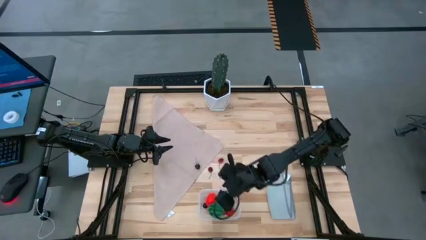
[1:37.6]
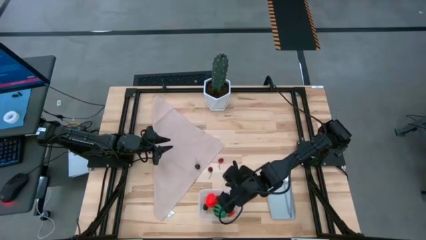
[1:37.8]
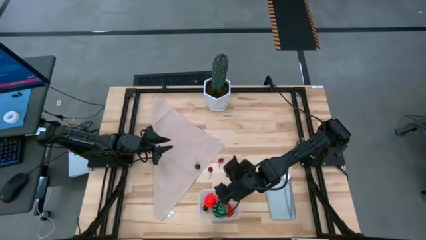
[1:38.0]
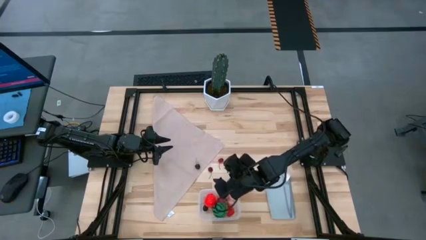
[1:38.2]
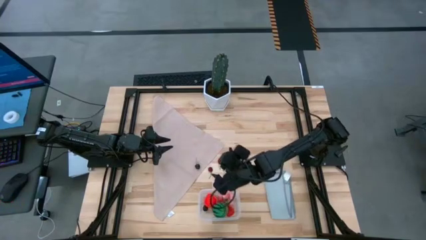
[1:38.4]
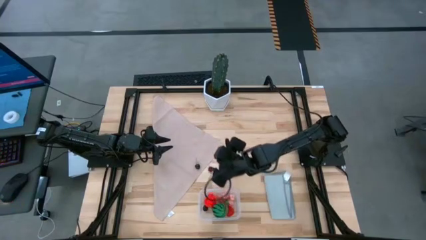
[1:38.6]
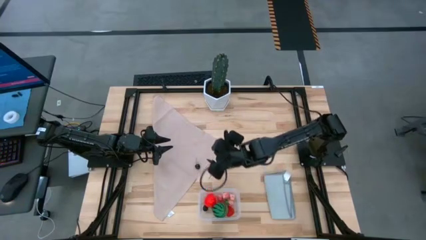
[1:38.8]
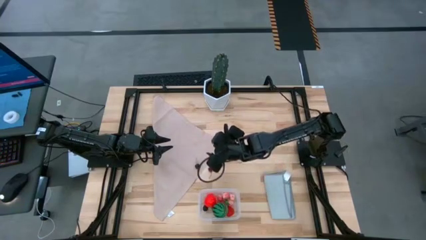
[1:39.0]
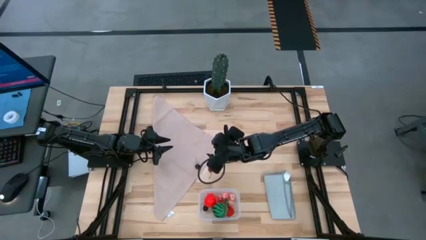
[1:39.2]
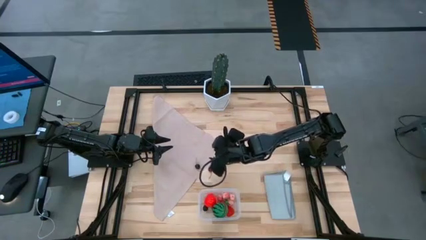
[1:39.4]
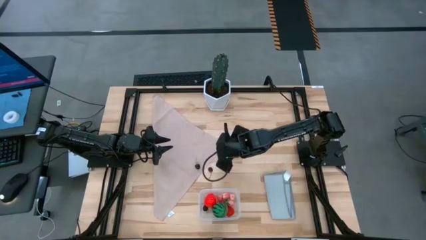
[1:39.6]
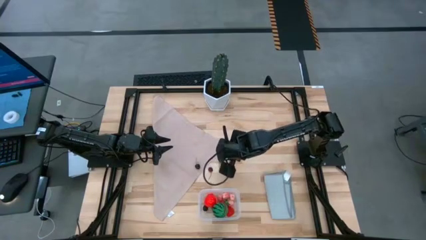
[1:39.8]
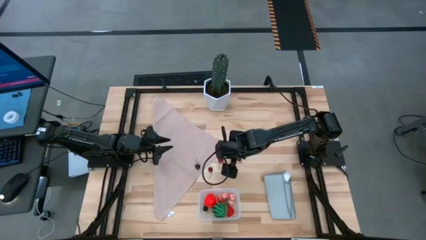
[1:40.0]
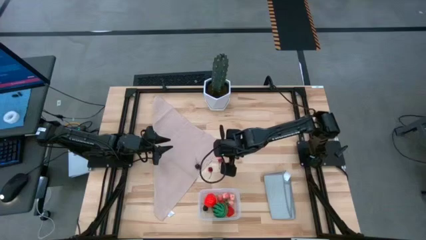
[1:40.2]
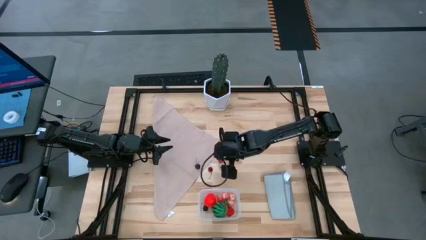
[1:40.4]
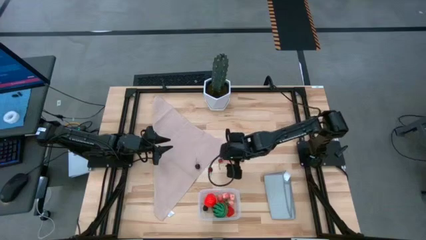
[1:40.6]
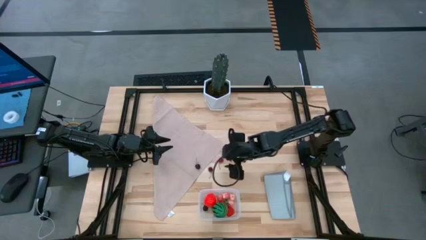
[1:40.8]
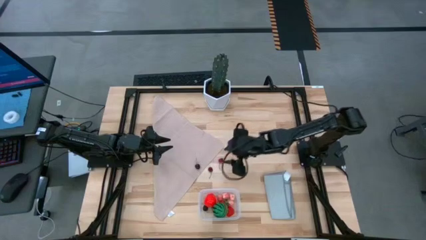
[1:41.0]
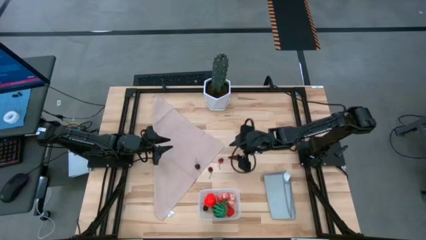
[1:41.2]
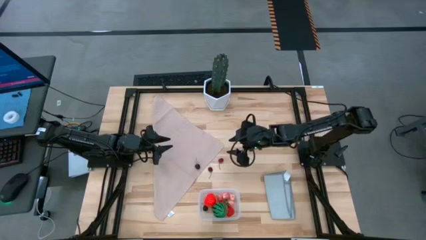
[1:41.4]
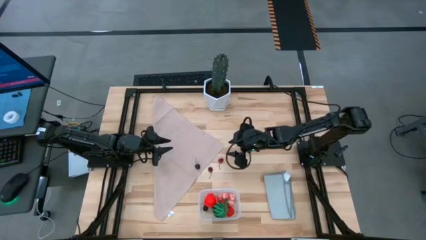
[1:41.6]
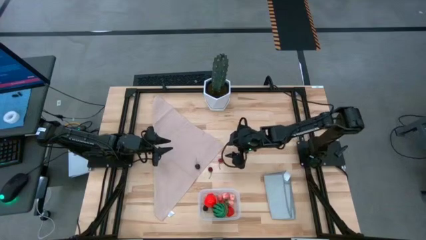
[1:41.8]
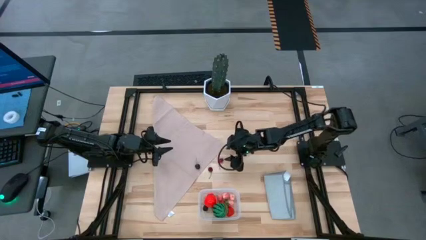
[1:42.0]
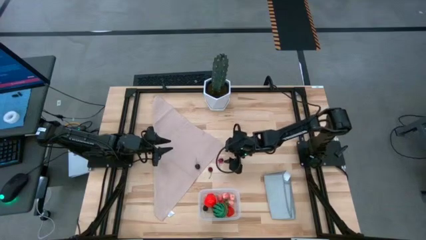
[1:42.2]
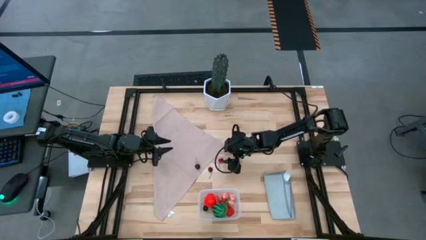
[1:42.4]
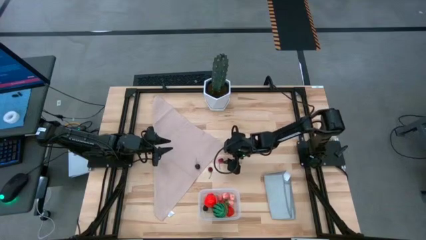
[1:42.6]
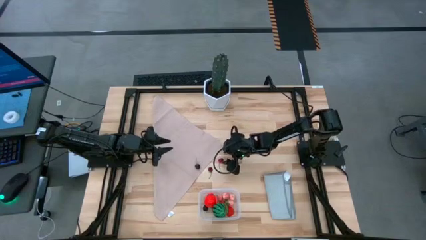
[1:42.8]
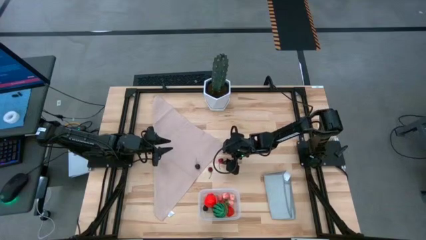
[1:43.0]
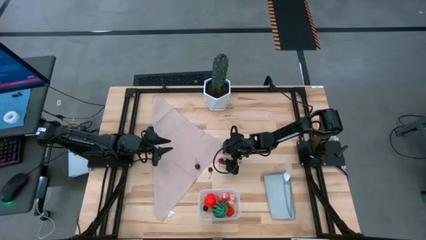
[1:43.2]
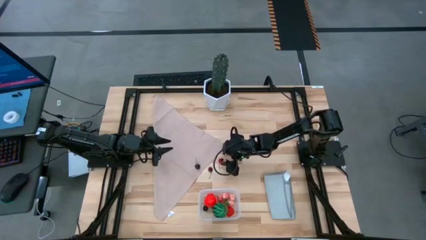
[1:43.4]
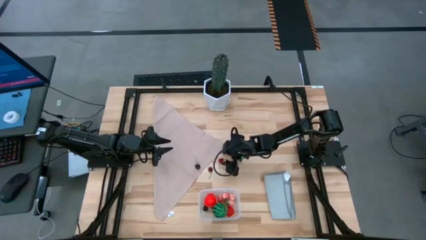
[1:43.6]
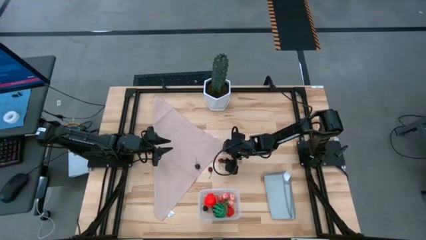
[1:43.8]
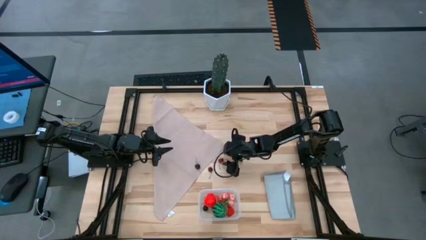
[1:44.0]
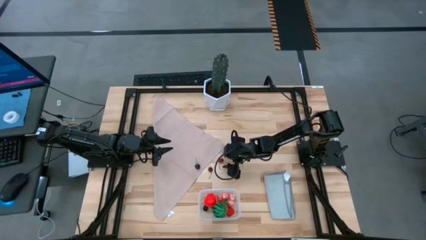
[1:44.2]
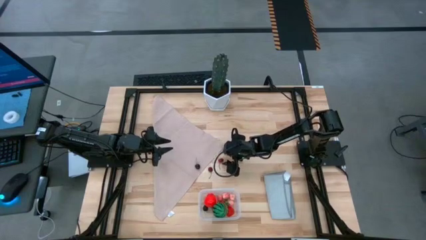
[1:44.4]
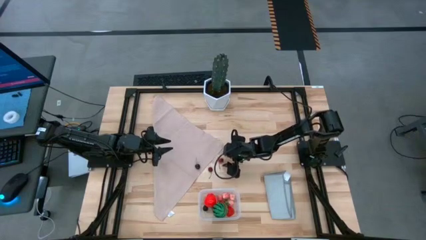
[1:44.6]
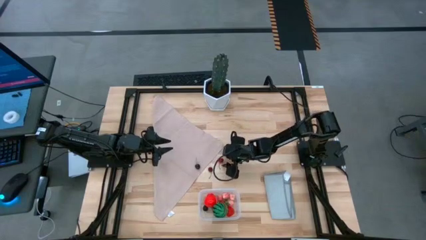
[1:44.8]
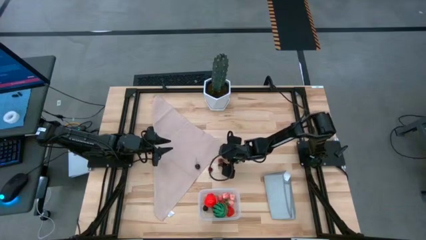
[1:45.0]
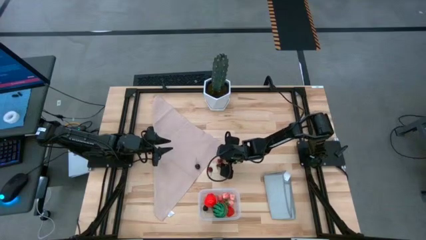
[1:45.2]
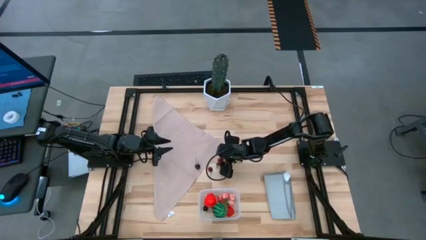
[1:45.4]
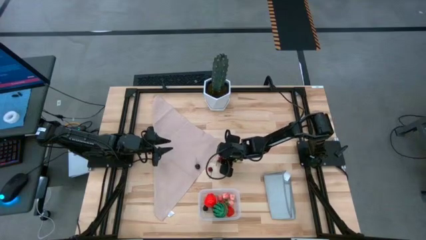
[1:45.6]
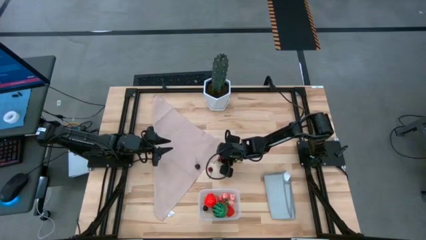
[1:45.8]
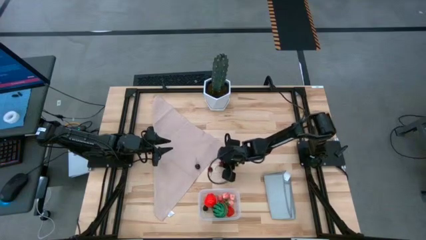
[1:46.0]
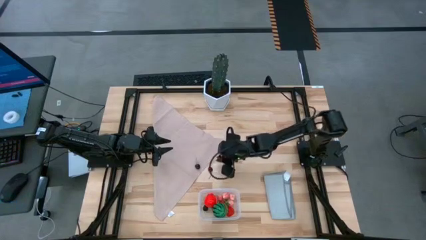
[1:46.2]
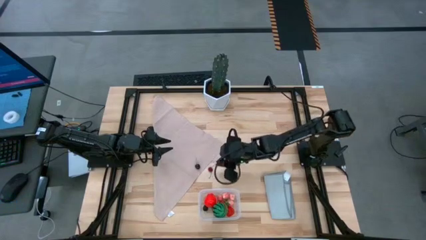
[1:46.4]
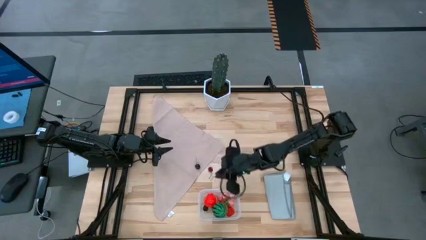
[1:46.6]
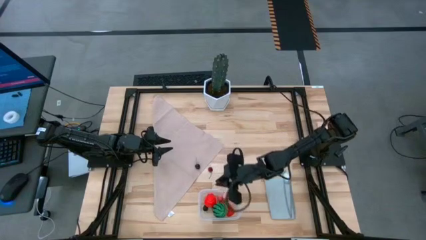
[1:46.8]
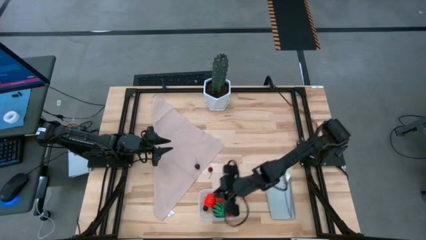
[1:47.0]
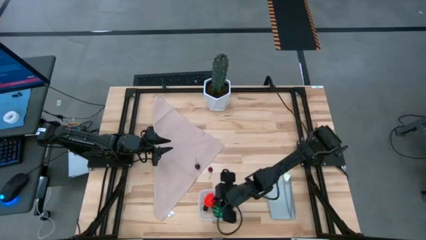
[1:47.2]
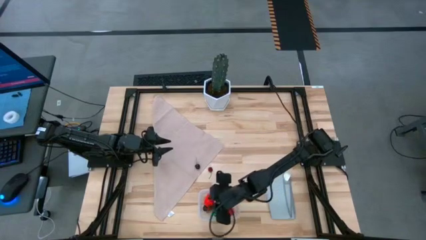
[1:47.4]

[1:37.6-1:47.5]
Task: Pick and placing Produce into tupperware
Put the top red cherry into the transparent bin

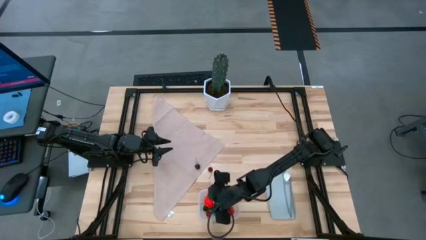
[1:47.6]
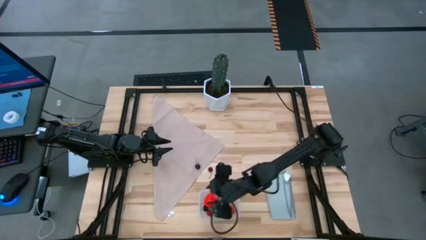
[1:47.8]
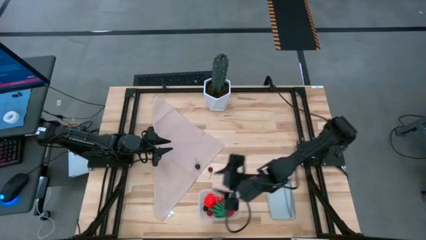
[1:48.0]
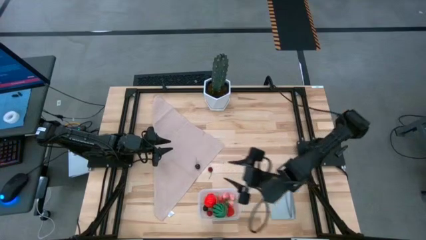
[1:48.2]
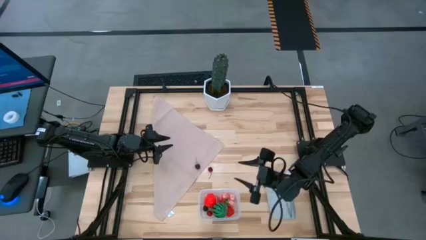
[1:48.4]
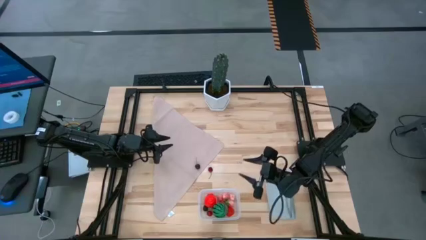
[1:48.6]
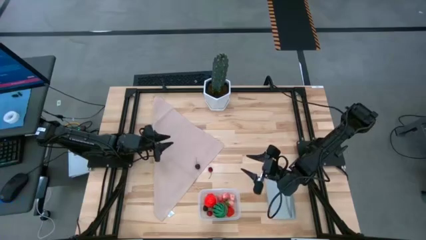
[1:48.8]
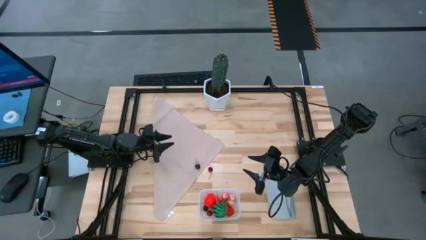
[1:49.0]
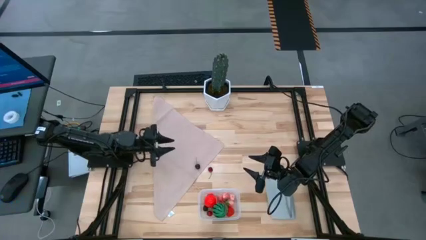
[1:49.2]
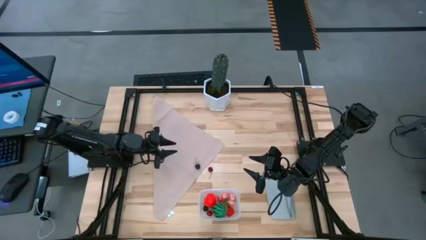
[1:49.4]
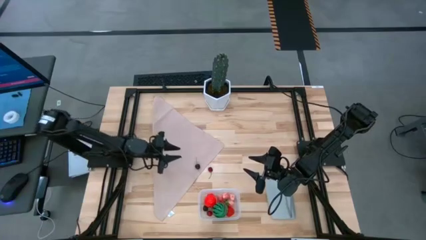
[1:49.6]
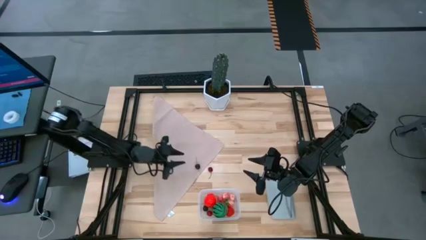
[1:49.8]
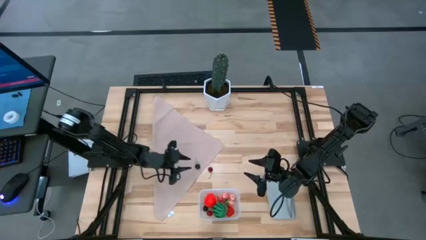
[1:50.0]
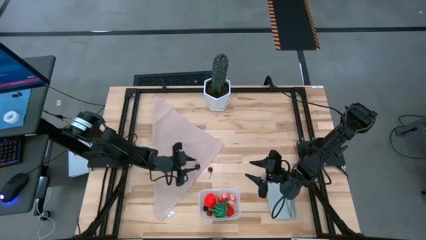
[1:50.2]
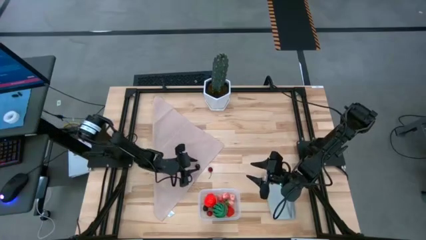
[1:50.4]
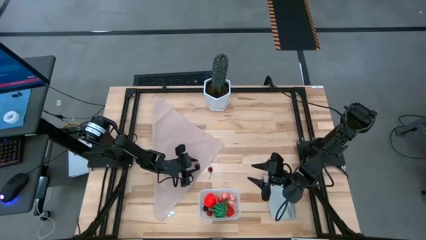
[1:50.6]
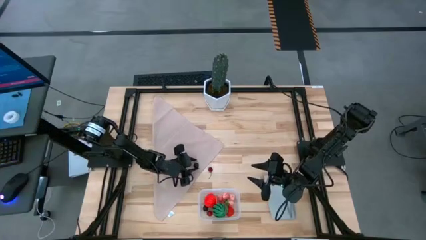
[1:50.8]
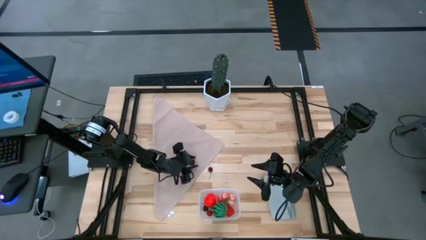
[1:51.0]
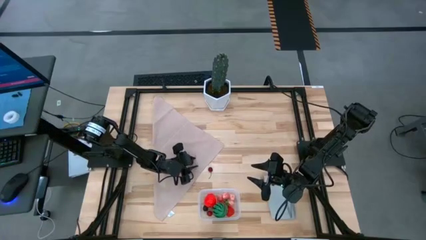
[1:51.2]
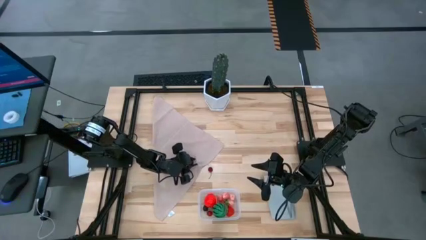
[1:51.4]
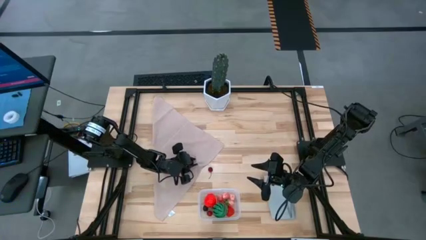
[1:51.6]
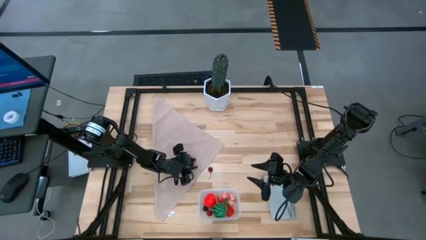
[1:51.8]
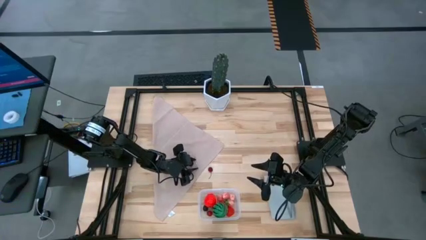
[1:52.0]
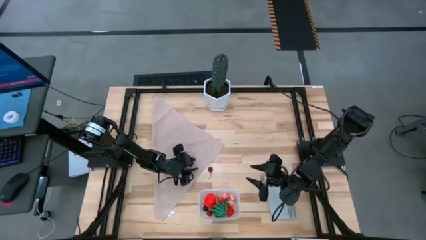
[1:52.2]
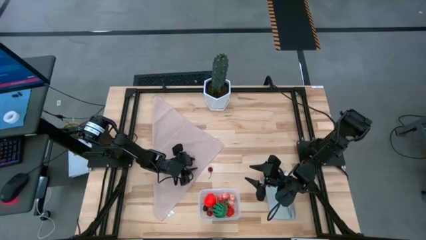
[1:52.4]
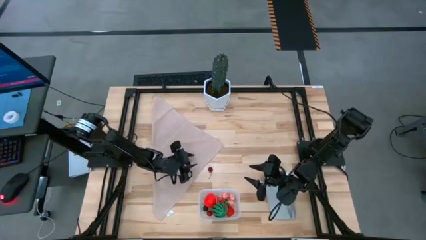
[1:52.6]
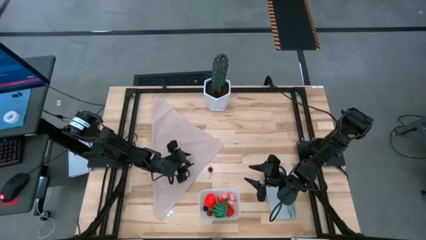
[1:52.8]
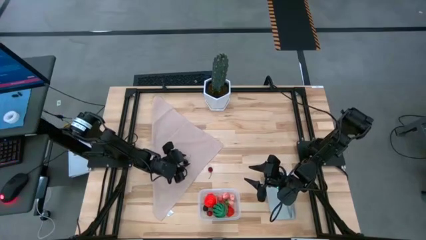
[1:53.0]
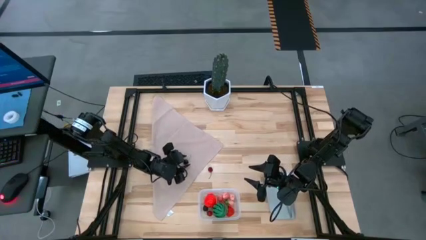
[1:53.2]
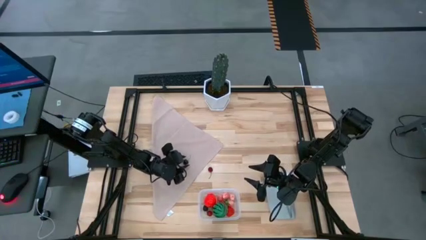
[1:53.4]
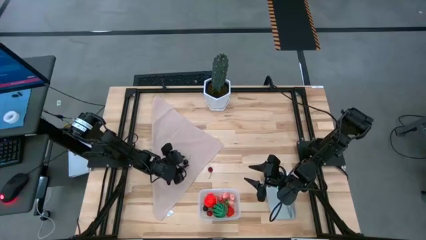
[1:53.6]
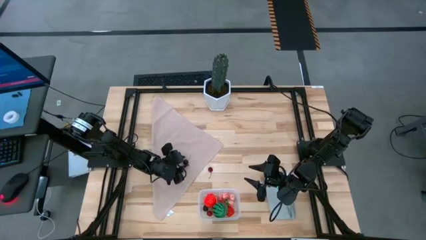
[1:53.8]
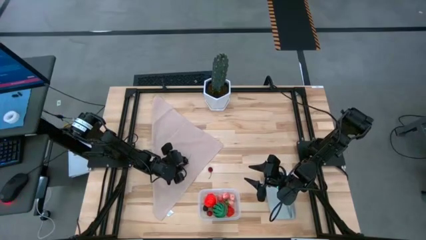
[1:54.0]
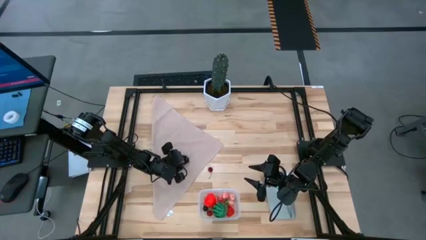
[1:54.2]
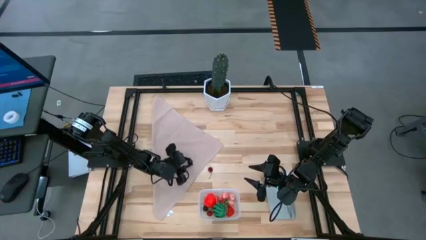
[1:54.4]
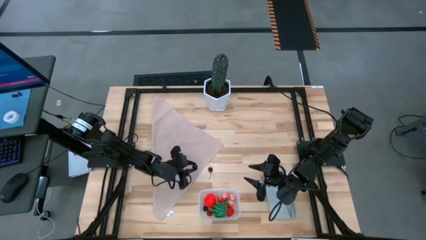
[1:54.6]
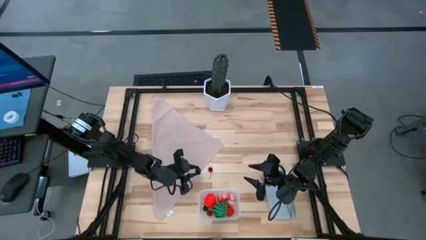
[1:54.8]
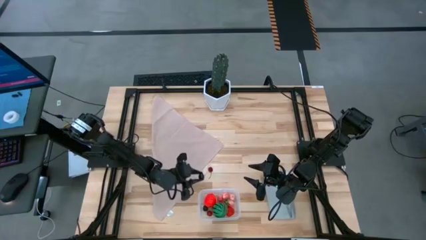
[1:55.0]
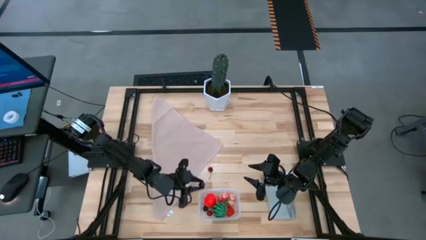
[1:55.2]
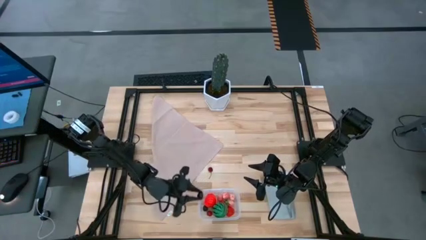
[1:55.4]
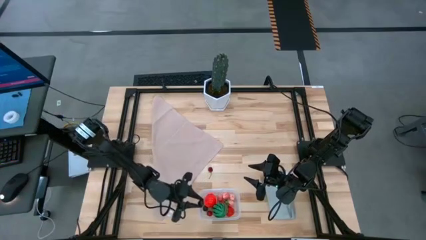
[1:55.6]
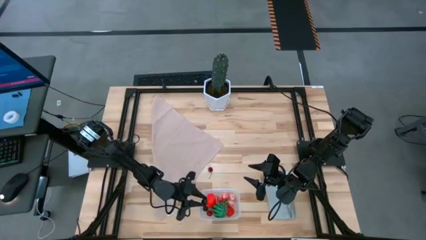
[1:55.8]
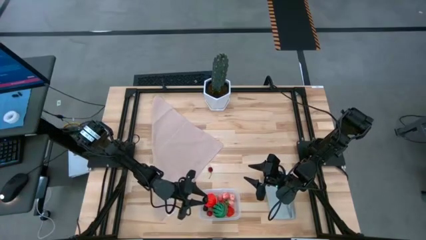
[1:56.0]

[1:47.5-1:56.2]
Put the black cherry into the transparent bin
